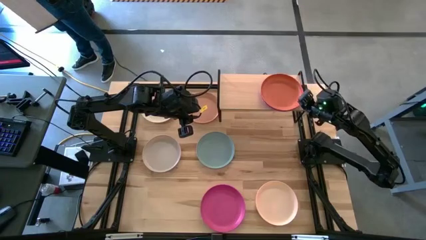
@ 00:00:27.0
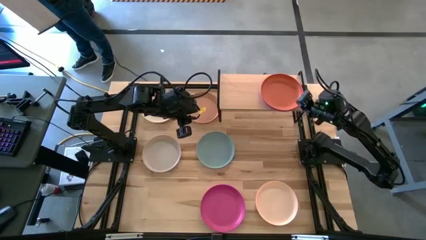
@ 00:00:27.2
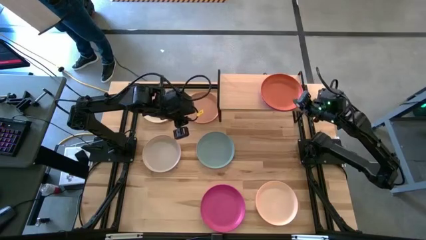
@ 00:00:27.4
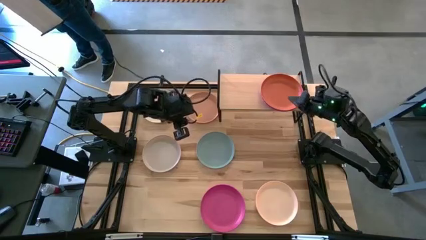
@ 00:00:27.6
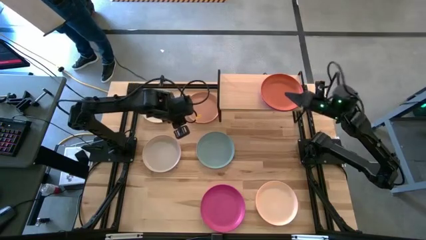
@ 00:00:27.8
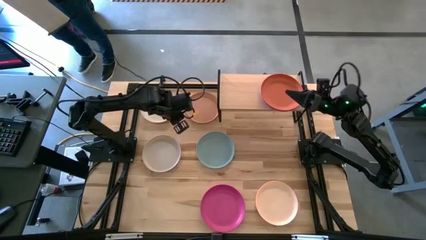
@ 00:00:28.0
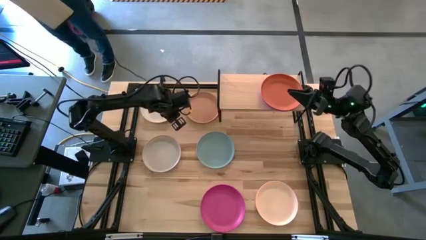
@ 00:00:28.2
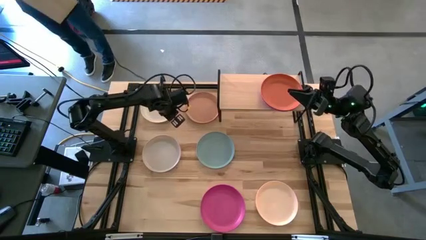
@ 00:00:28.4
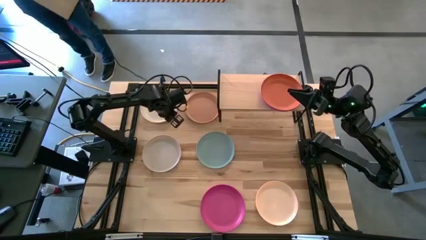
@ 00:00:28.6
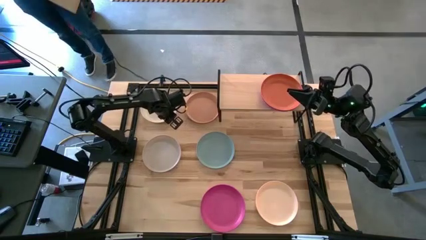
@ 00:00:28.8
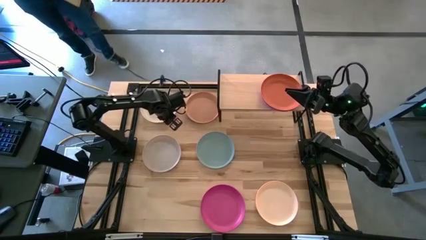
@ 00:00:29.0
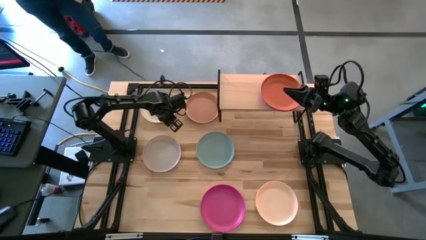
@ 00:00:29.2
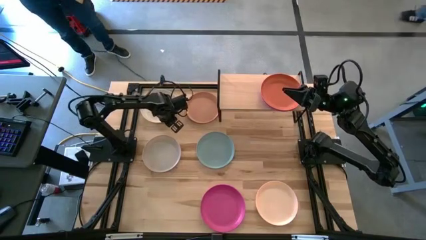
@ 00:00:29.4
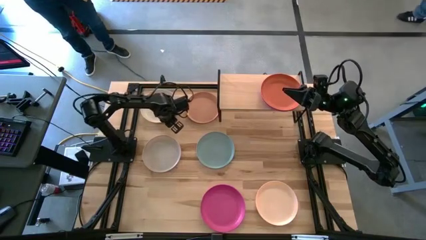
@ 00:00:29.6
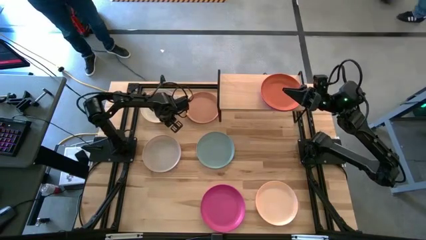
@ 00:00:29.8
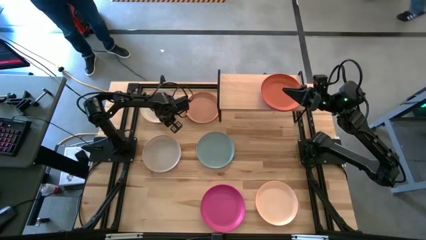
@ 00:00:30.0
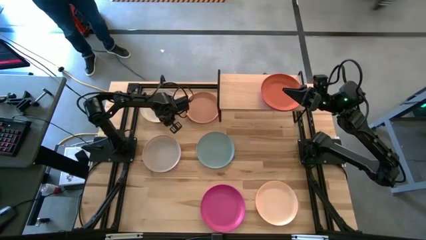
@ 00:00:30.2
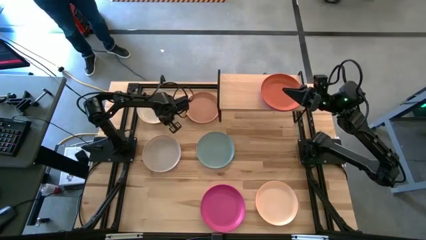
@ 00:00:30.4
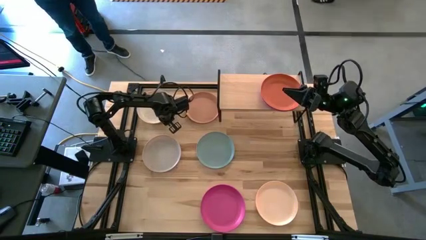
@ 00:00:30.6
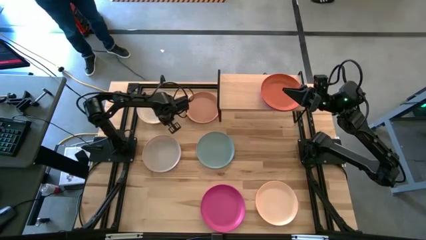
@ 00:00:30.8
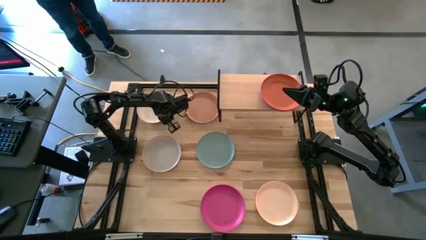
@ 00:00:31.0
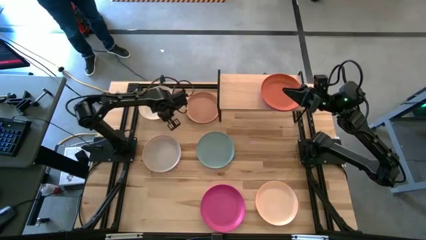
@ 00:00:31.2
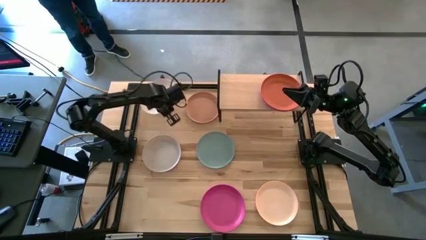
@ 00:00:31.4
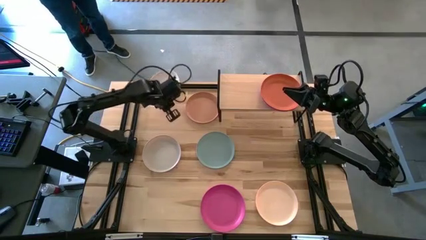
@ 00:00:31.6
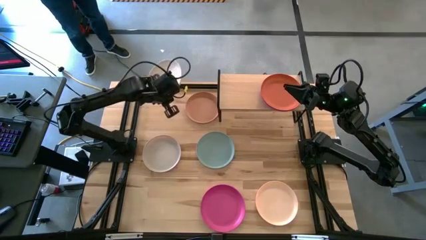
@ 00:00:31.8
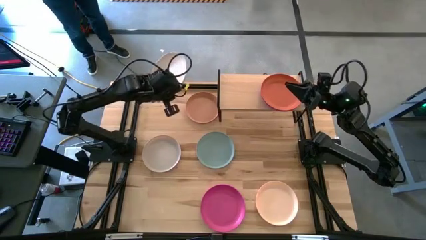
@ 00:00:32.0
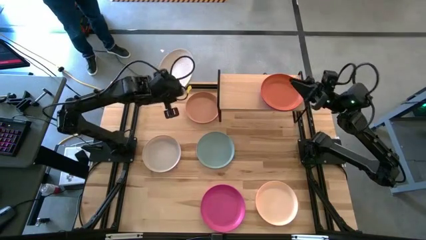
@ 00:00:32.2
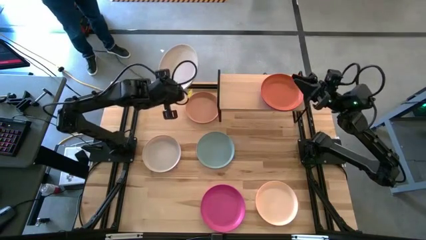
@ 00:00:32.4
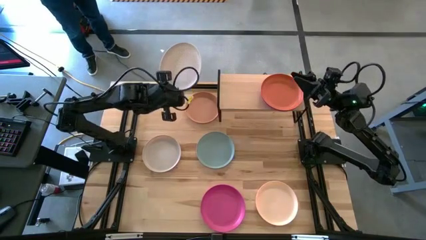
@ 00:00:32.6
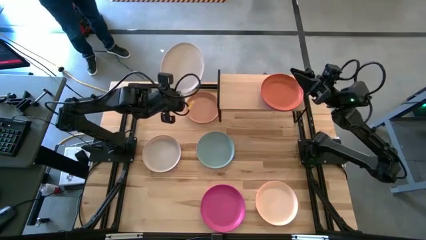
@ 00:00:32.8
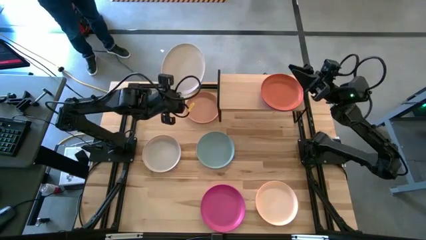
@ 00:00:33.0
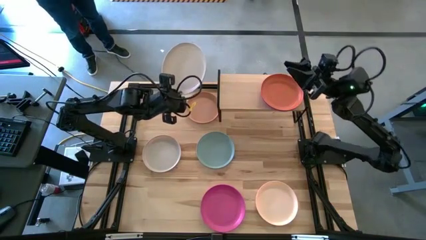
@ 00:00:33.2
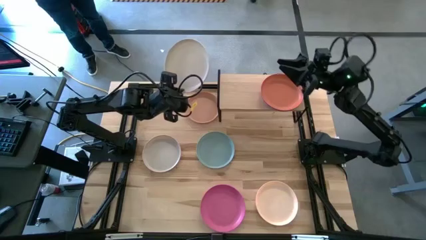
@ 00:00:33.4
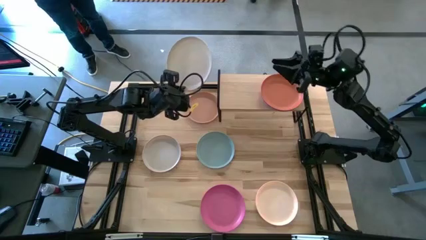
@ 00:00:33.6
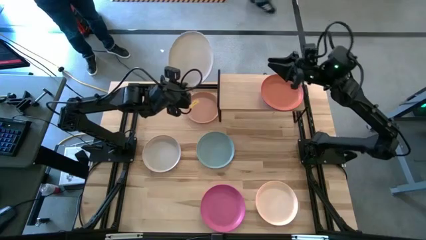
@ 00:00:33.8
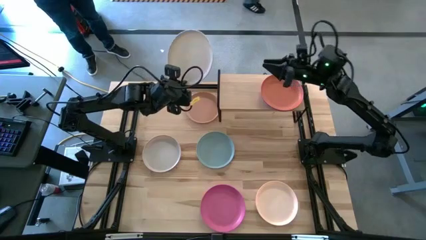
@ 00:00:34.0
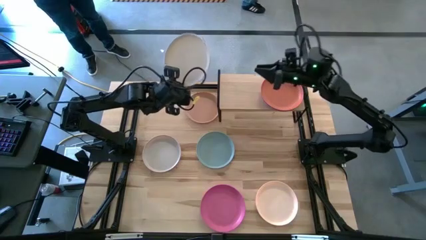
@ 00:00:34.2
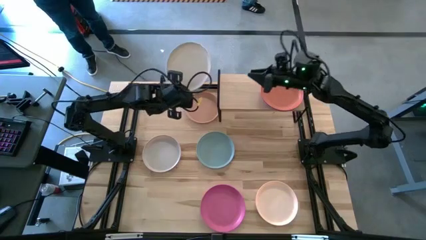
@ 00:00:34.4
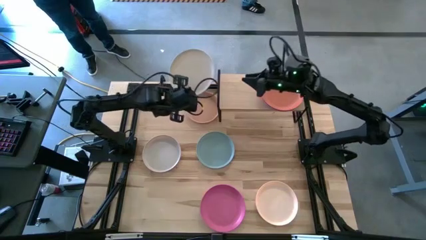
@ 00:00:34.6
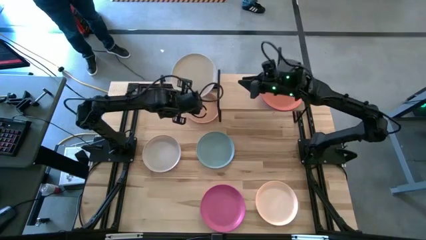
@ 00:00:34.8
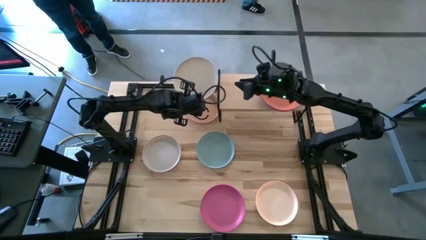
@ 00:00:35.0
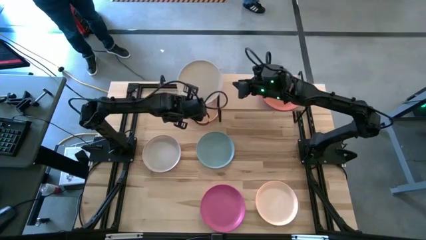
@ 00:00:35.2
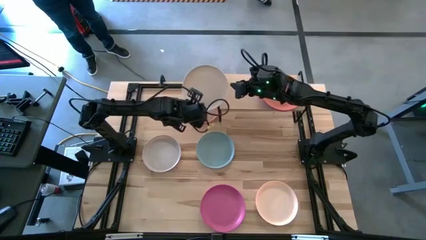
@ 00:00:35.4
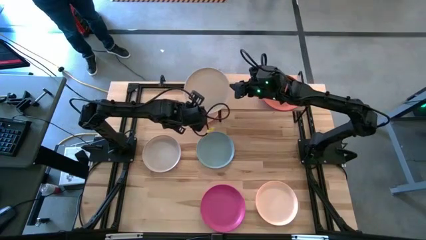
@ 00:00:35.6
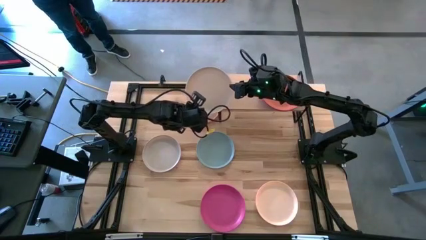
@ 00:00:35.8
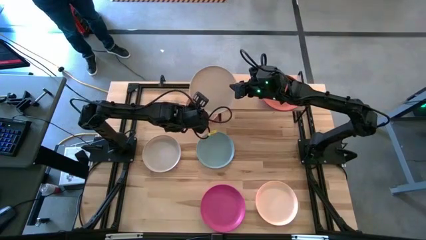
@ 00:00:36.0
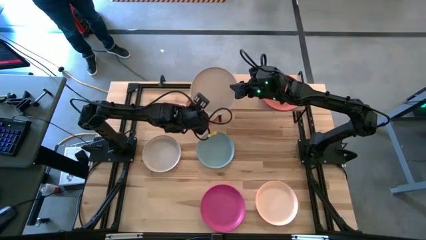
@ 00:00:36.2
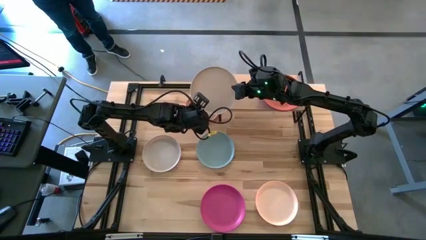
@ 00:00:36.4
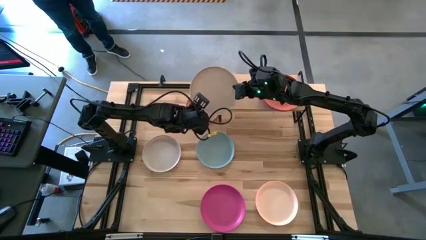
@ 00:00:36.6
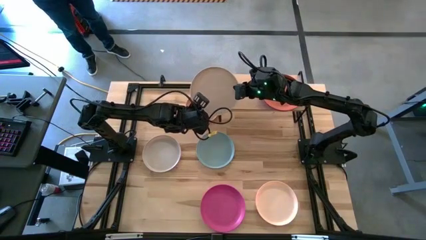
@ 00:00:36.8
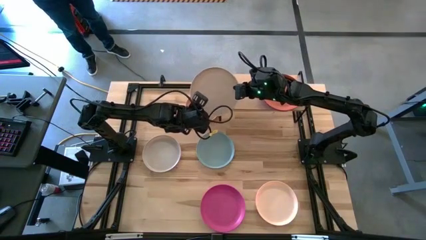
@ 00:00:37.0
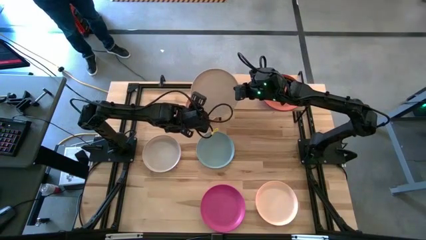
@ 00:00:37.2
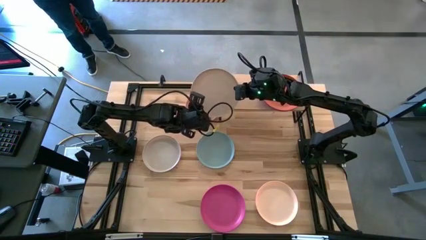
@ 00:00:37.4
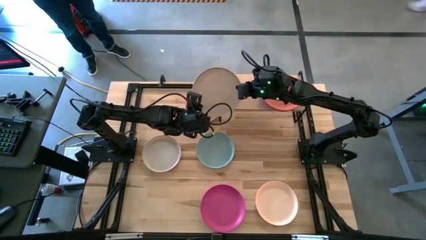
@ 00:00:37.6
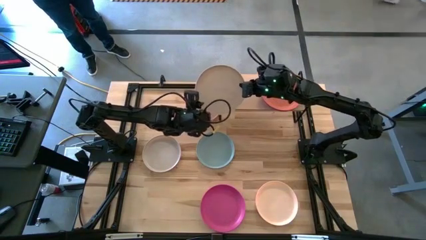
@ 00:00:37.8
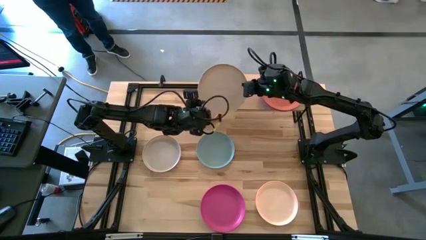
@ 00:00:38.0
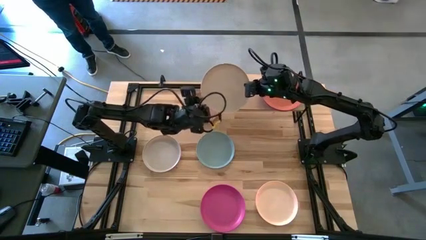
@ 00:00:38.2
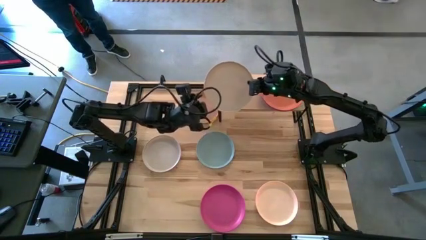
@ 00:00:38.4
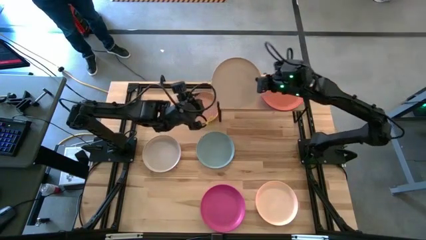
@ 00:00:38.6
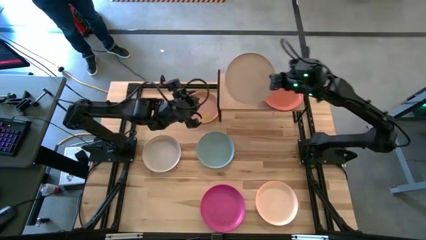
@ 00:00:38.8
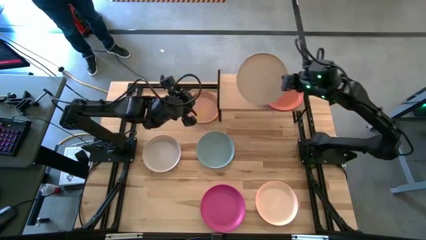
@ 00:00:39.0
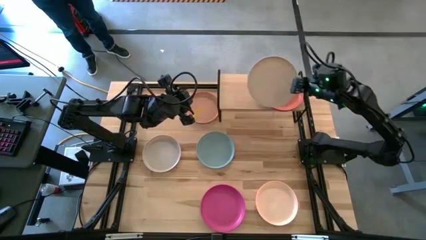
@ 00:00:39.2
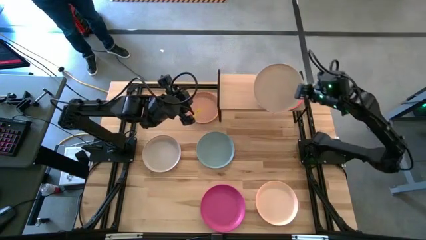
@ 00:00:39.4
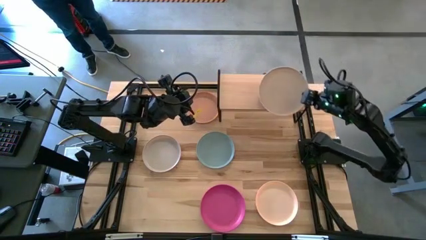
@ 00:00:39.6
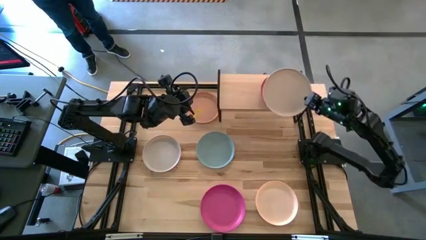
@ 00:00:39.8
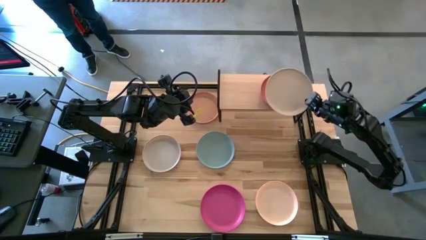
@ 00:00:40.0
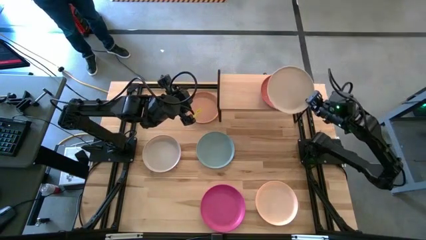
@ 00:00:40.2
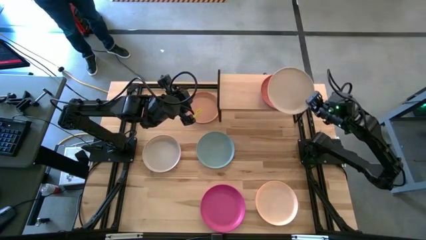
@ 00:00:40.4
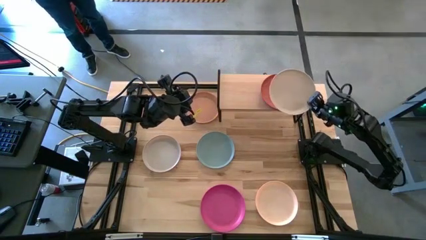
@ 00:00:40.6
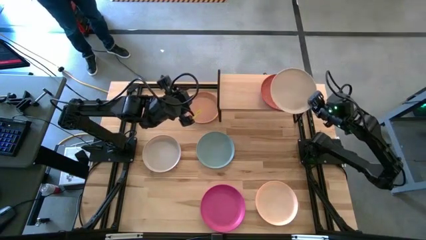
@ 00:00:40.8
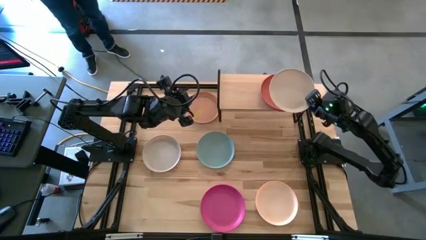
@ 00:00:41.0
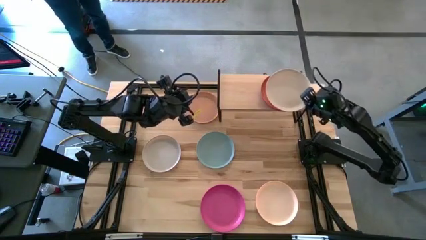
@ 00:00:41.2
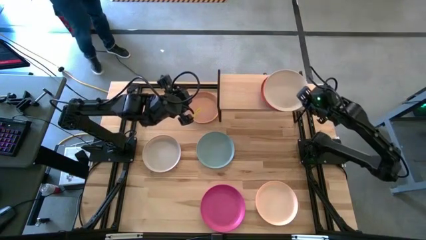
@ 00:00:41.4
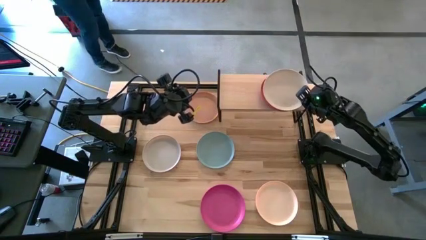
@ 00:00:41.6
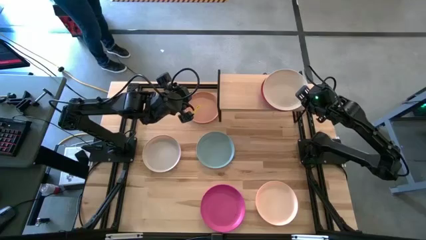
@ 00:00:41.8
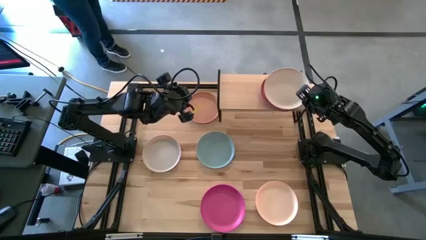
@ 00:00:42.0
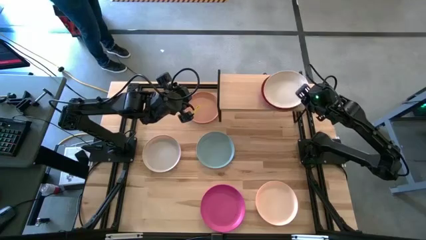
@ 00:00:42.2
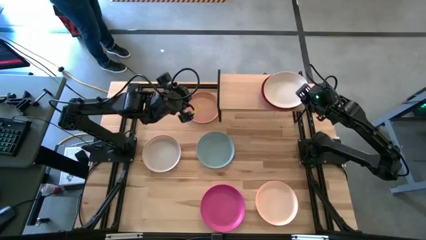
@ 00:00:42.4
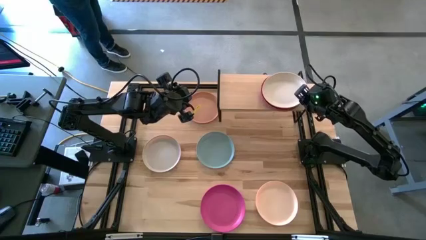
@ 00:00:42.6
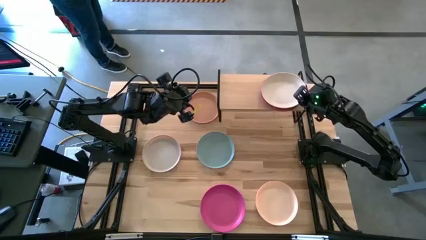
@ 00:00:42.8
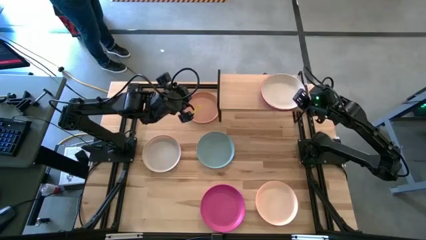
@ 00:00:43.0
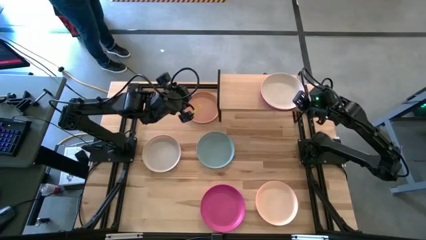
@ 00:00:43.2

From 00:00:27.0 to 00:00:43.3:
Task: Place and stack plates onto a shelf
Stack the white plate on the orange plate on the shelf
